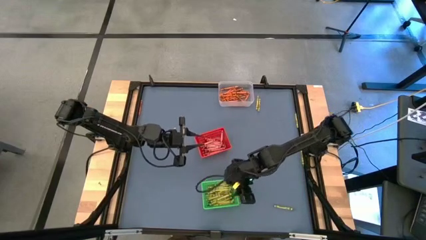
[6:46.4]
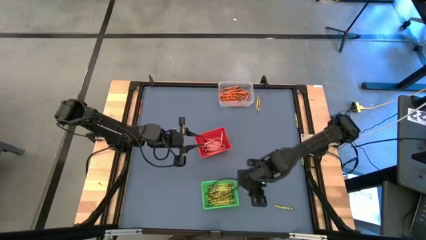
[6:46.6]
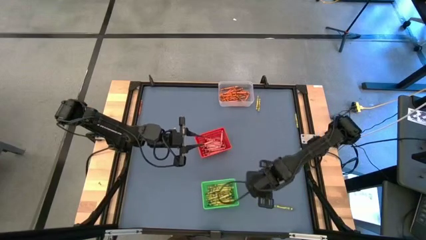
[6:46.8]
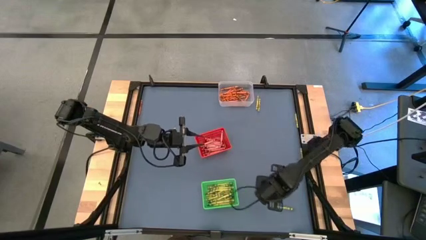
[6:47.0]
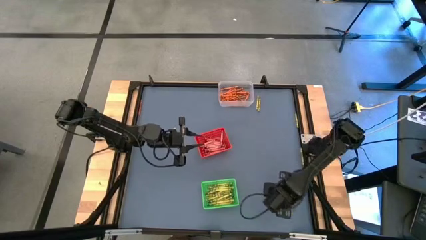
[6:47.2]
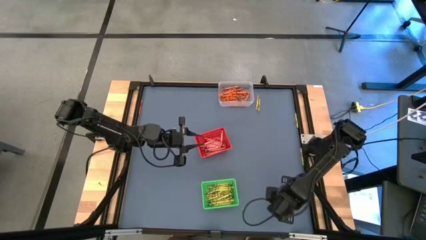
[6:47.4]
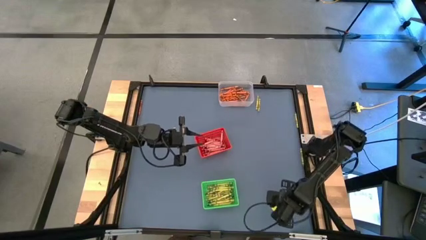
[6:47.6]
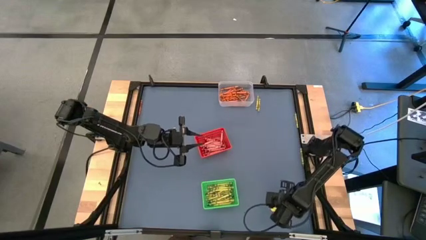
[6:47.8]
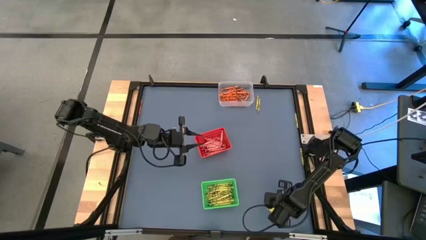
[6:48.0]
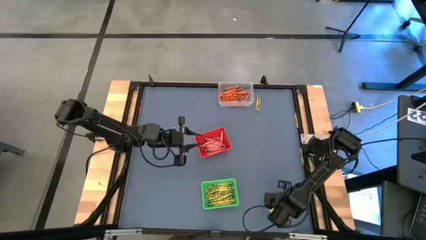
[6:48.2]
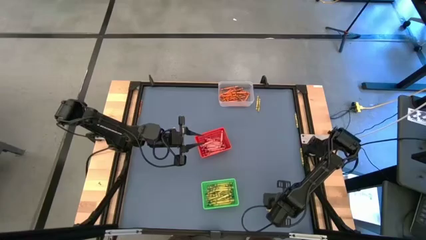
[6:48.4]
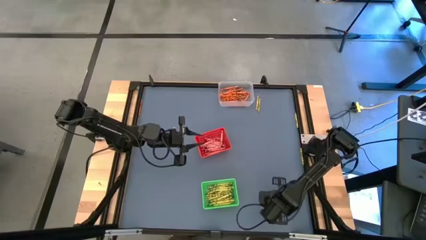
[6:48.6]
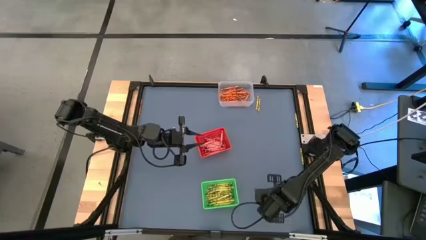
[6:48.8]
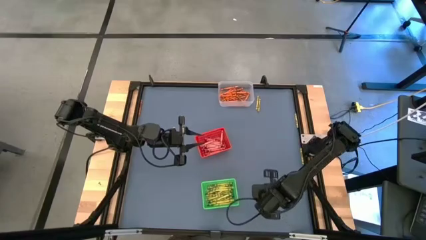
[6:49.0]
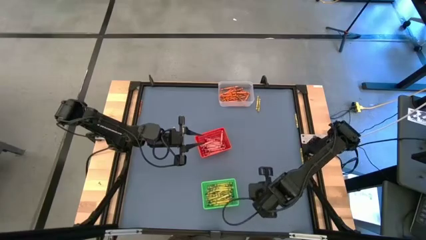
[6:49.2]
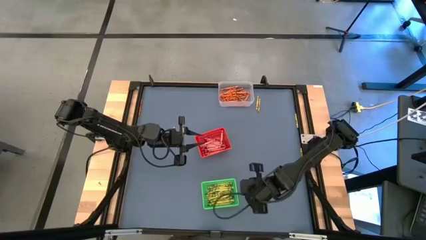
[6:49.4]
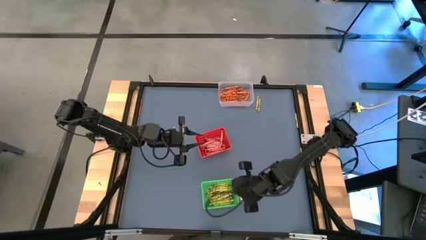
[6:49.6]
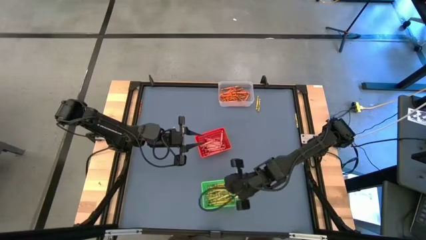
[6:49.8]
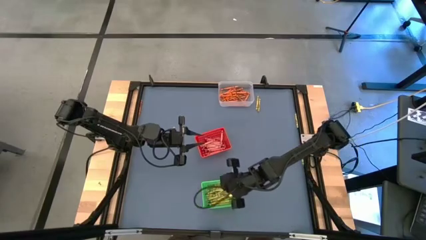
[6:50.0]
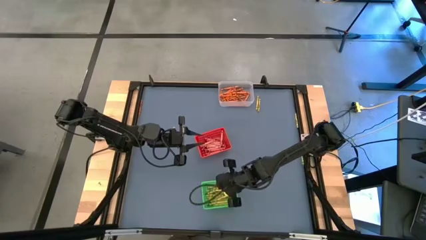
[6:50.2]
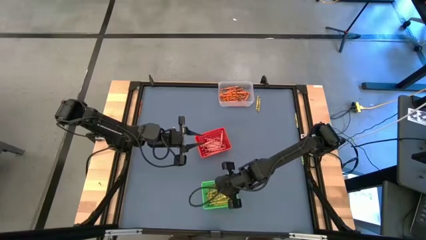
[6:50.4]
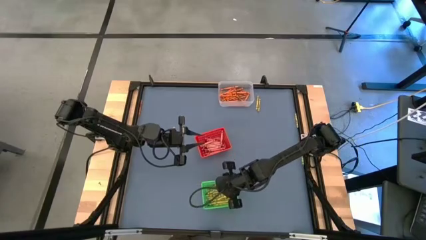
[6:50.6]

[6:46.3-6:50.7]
Task: Sort crayons
Put the green crayon into the green bin

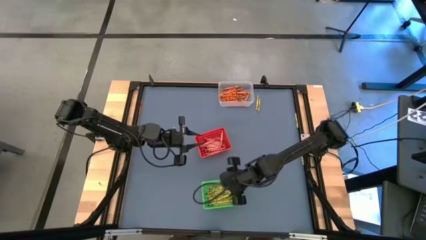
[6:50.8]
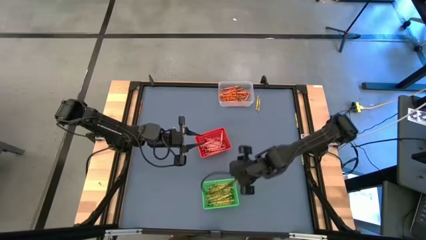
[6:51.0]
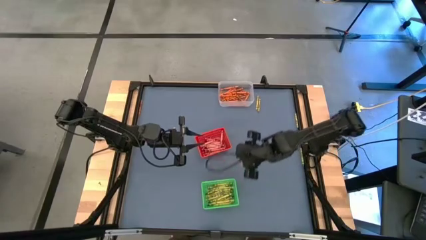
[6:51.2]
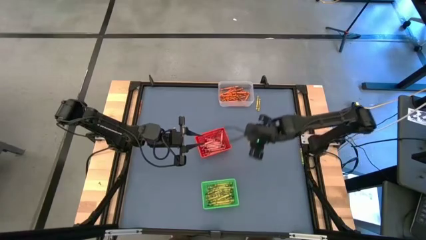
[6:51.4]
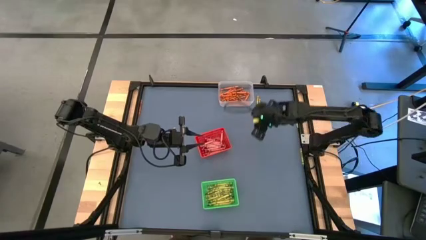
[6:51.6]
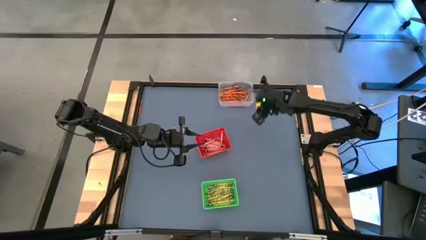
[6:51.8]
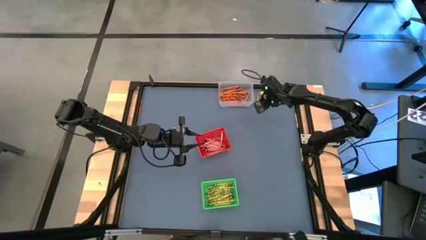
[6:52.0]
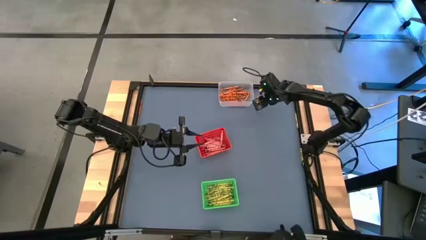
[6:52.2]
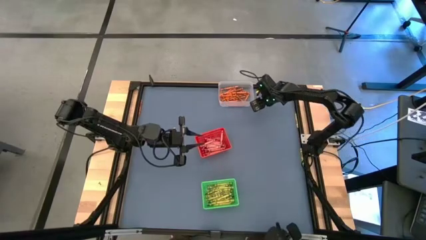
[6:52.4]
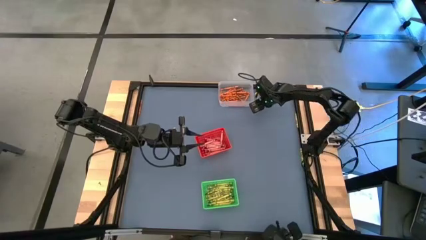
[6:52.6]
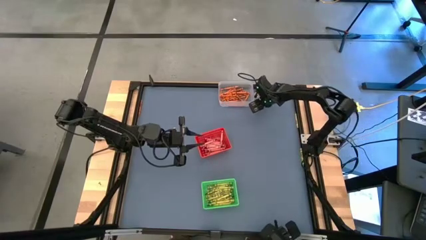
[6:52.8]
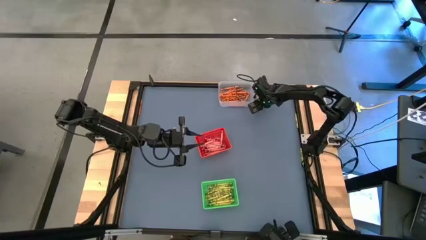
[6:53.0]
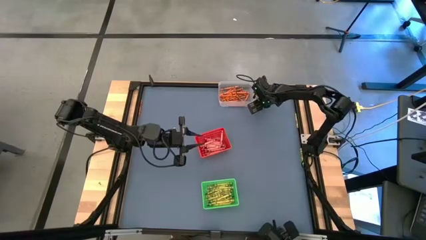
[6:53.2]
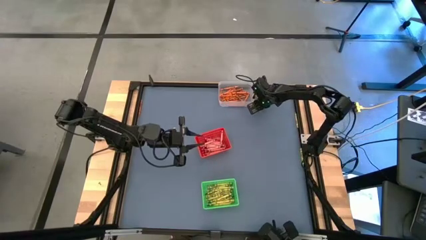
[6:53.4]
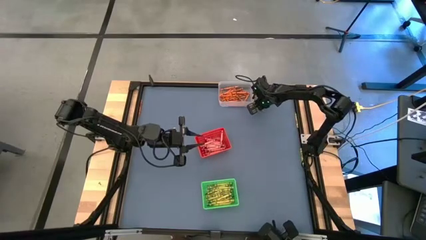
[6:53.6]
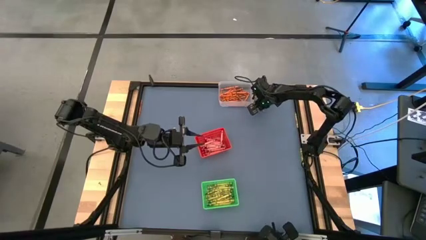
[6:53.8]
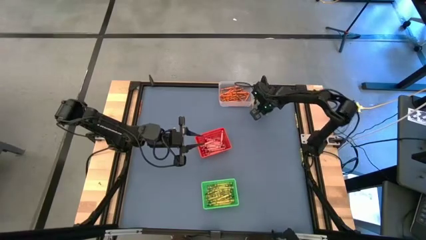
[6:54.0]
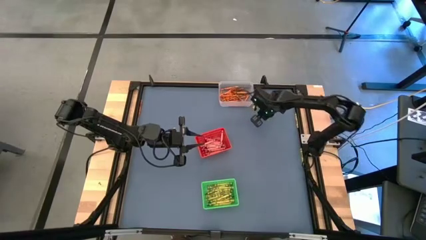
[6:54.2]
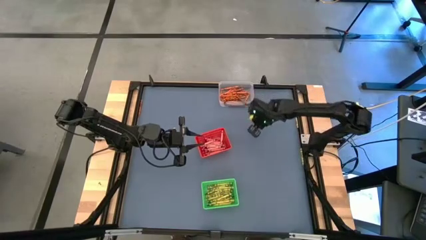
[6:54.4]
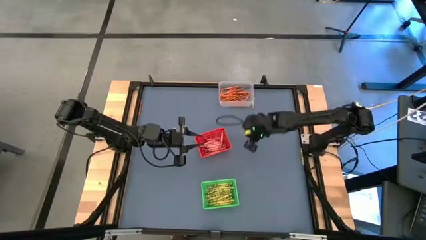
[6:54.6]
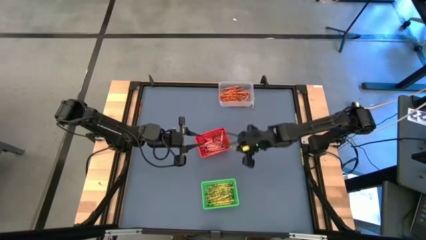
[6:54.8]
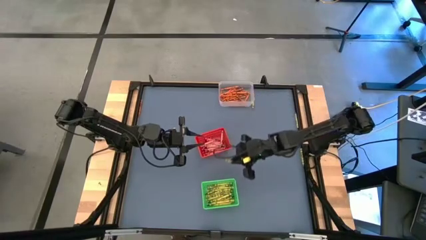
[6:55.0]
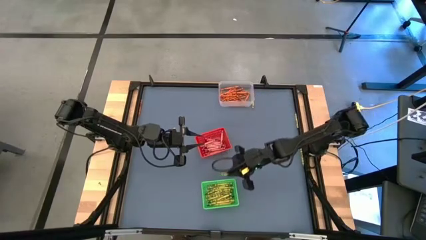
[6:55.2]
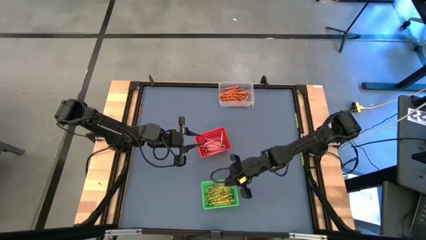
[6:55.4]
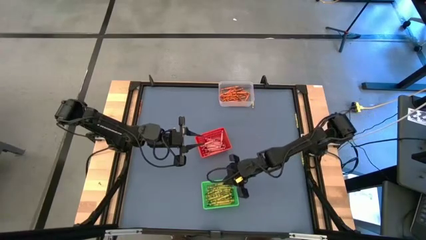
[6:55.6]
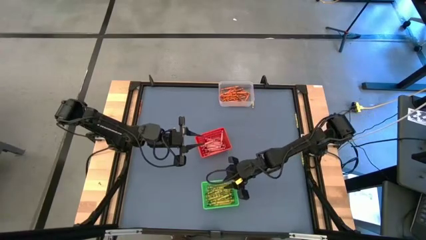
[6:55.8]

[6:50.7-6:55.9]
Put the green crayon into the green bin

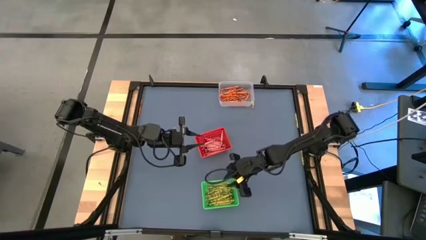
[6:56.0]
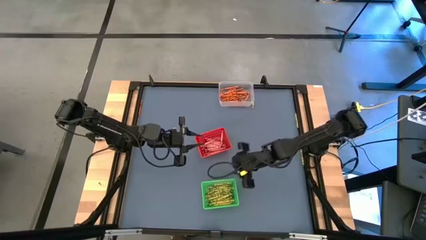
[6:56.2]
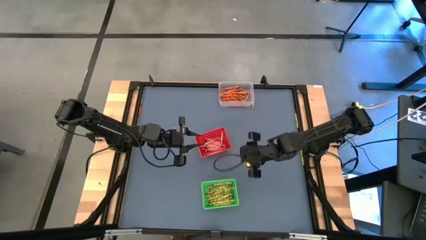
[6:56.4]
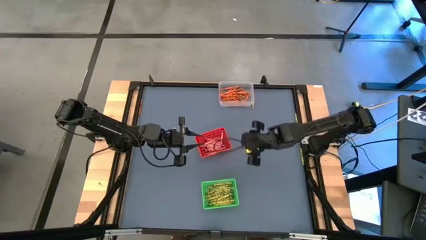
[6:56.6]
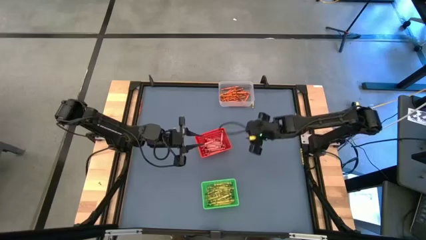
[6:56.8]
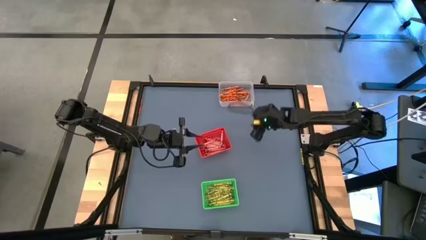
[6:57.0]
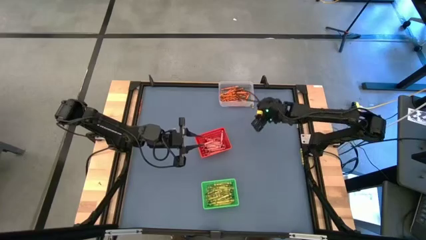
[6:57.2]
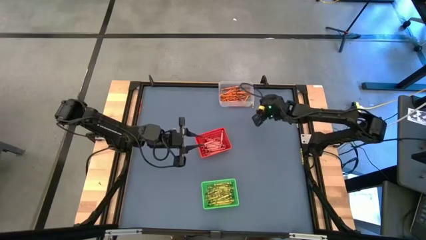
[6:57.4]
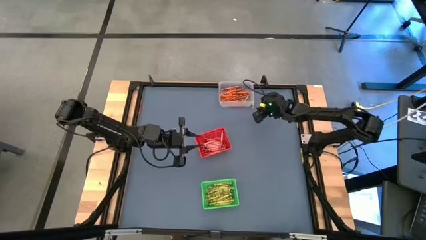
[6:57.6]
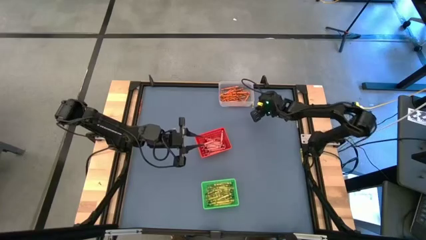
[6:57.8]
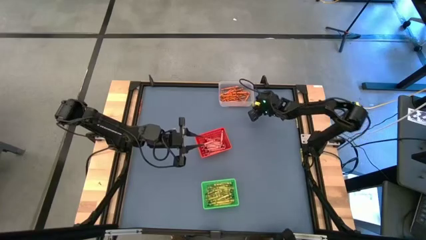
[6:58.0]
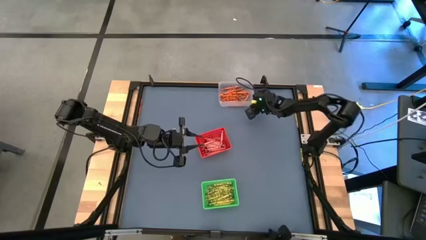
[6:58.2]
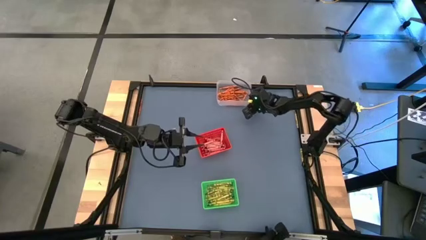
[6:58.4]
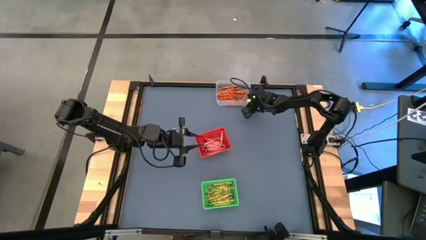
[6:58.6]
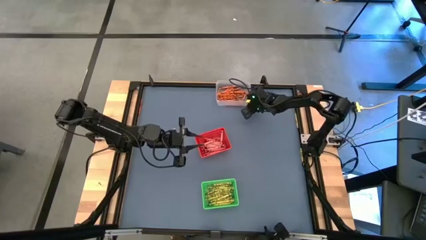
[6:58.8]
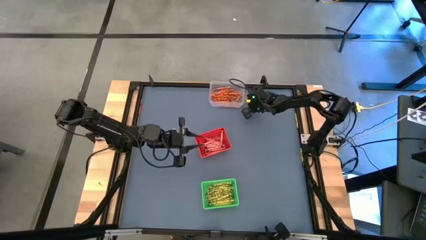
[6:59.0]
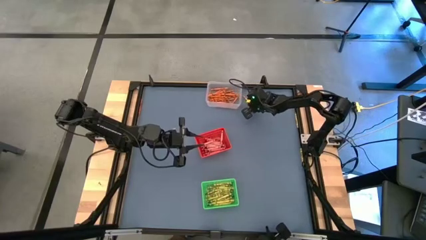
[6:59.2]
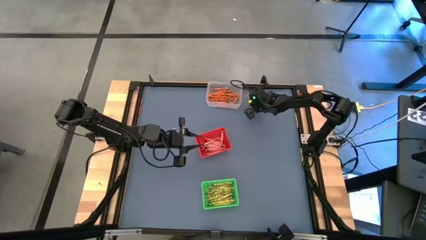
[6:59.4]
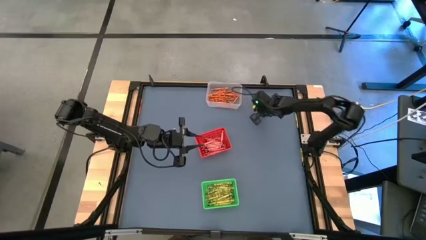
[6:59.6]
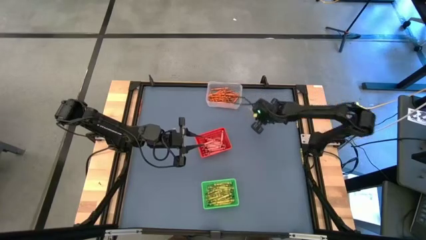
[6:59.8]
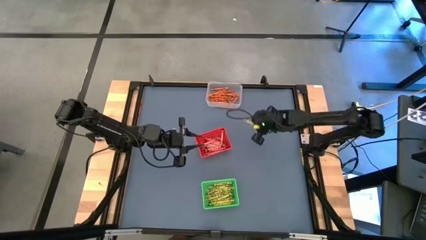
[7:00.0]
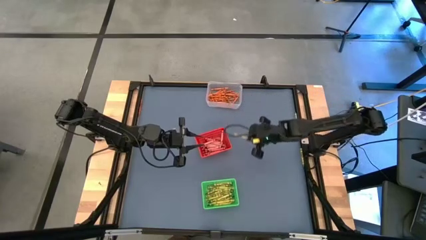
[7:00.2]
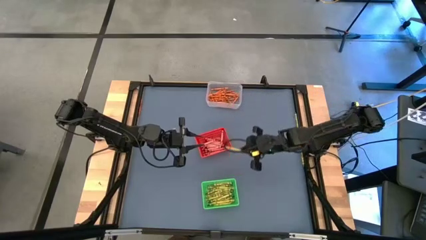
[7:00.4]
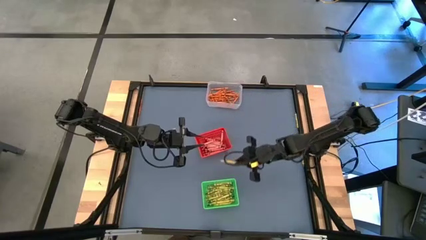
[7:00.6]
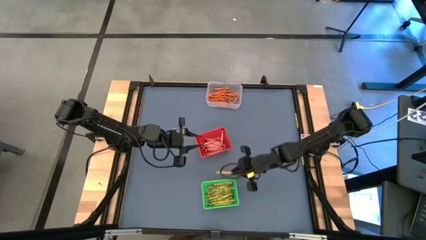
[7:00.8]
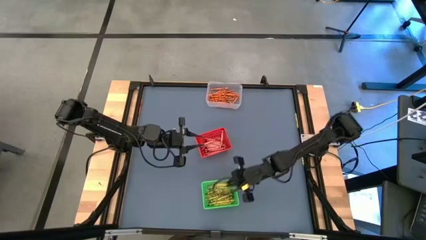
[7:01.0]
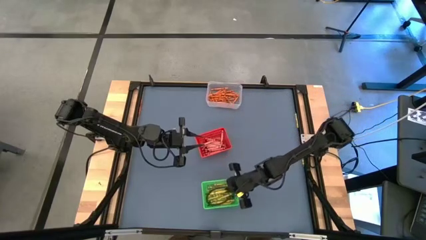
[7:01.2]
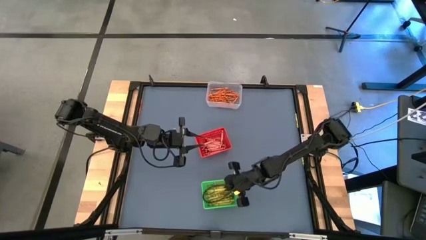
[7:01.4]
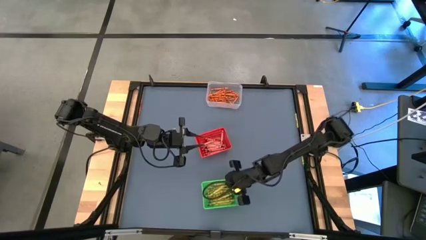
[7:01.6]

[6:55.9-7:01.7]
Put the yellow crayon into the green bin
